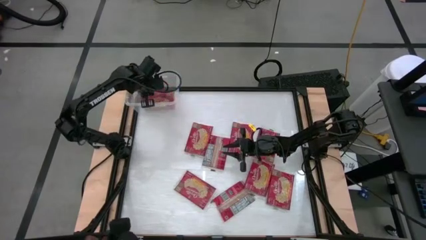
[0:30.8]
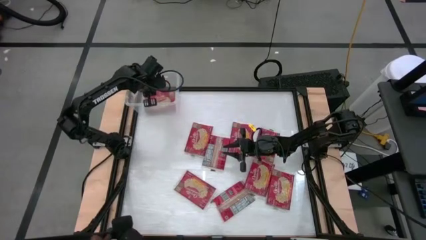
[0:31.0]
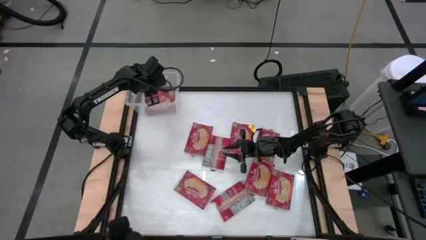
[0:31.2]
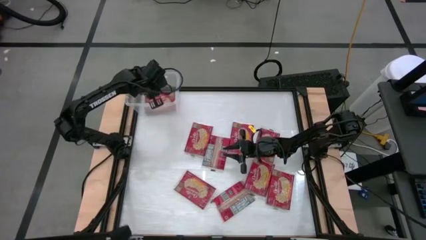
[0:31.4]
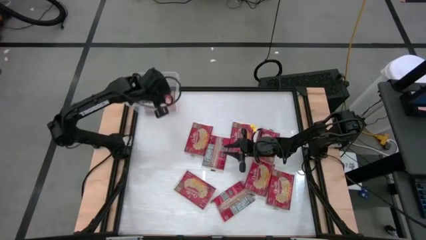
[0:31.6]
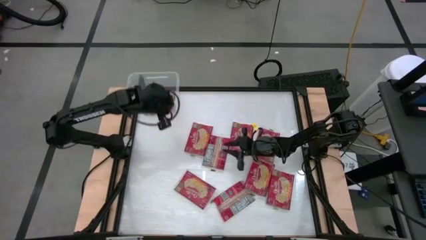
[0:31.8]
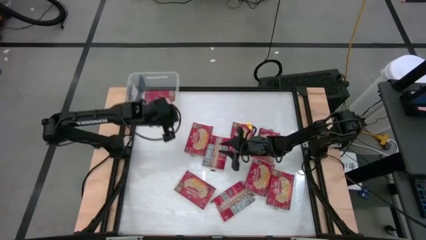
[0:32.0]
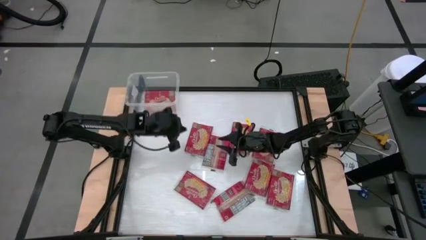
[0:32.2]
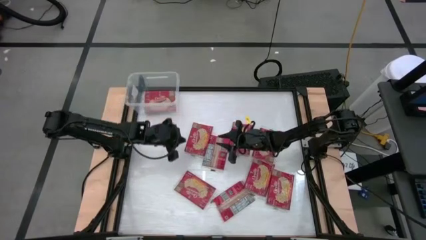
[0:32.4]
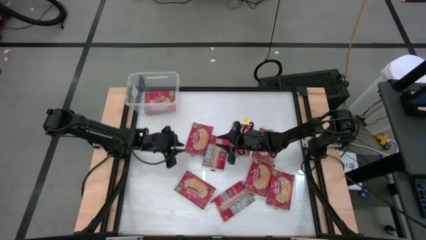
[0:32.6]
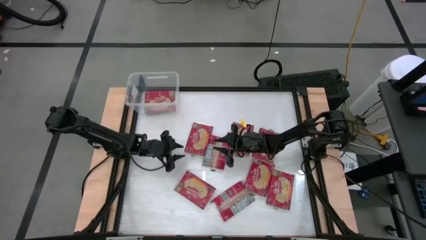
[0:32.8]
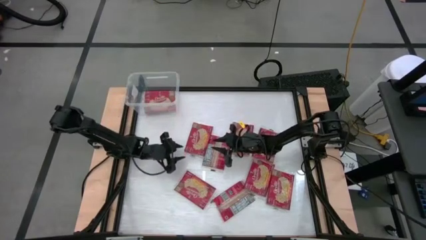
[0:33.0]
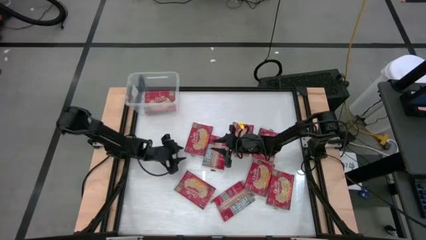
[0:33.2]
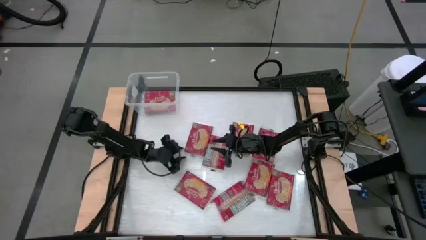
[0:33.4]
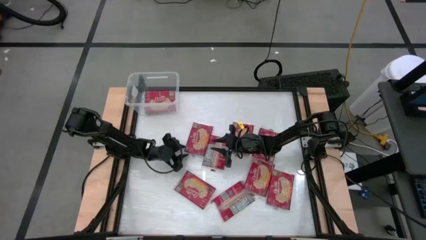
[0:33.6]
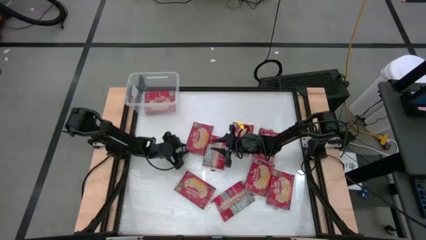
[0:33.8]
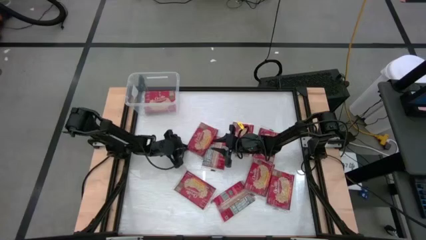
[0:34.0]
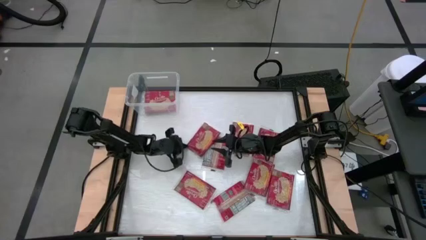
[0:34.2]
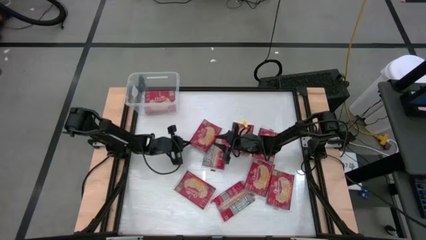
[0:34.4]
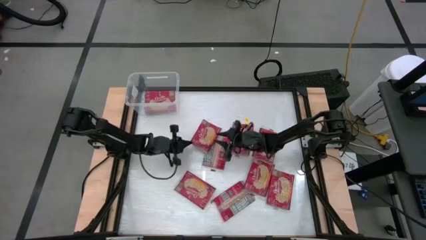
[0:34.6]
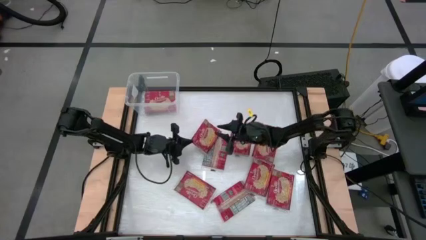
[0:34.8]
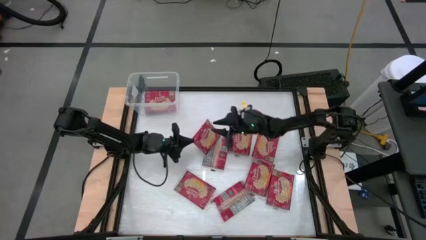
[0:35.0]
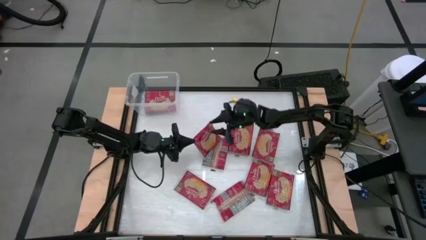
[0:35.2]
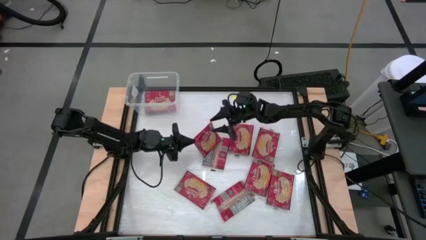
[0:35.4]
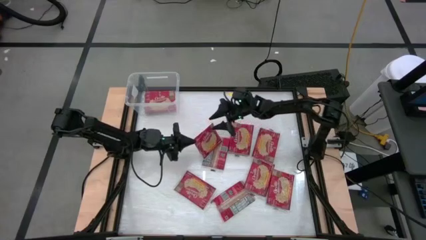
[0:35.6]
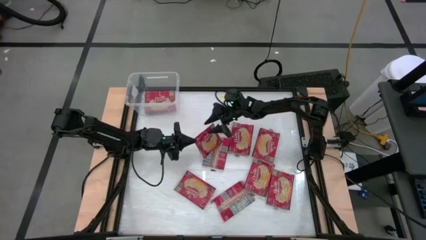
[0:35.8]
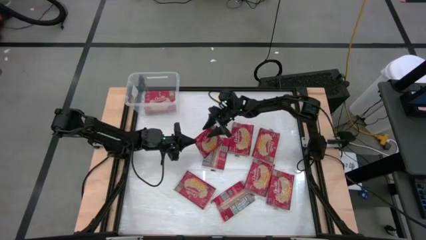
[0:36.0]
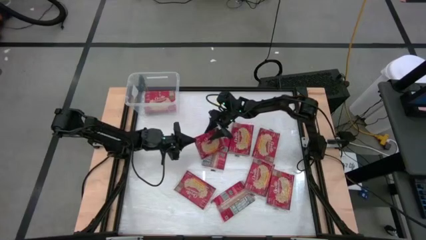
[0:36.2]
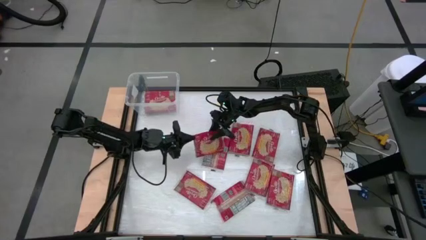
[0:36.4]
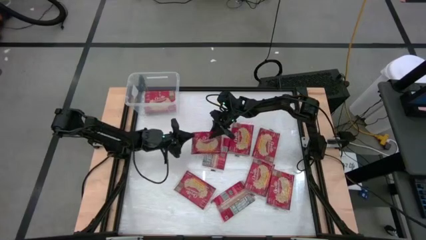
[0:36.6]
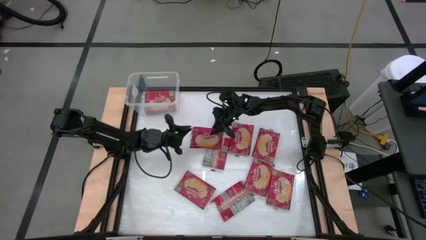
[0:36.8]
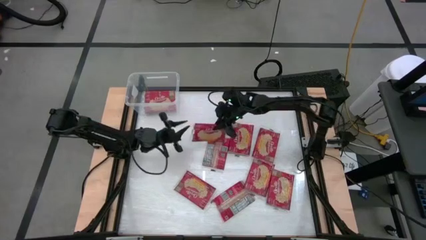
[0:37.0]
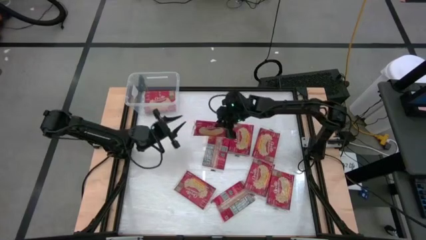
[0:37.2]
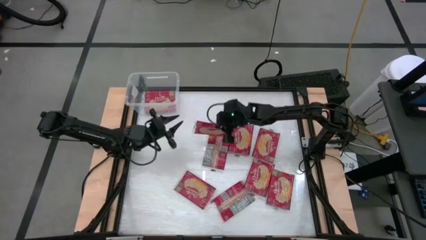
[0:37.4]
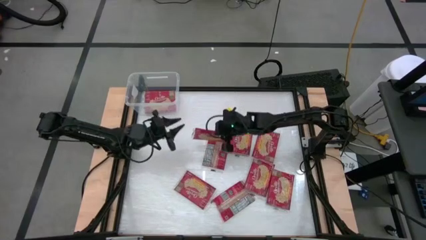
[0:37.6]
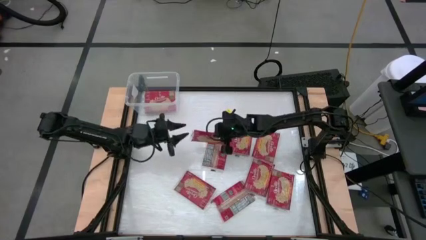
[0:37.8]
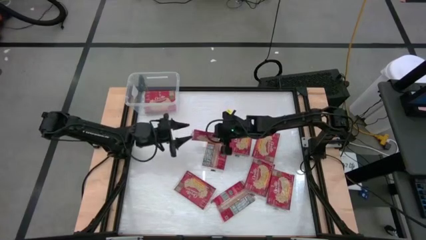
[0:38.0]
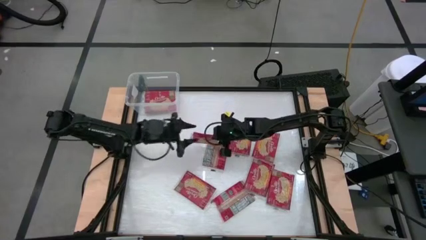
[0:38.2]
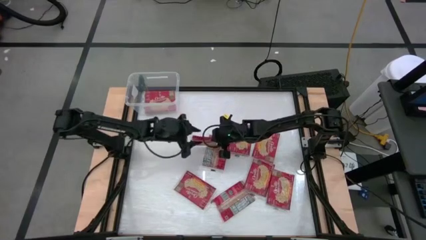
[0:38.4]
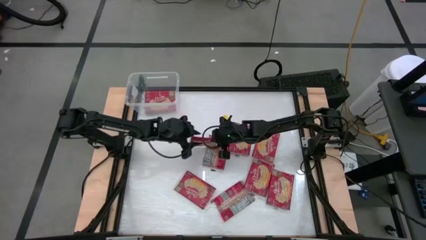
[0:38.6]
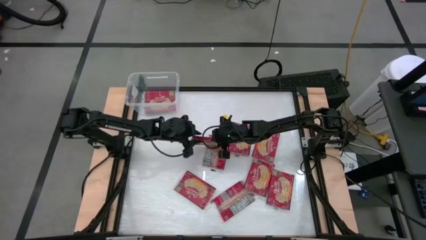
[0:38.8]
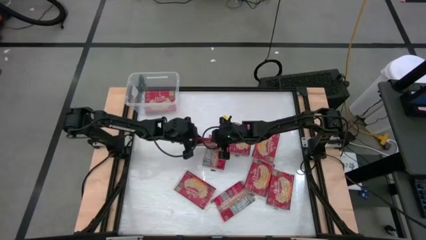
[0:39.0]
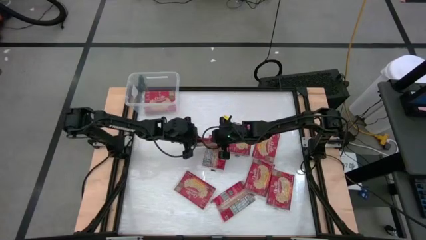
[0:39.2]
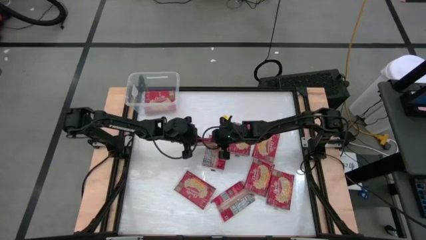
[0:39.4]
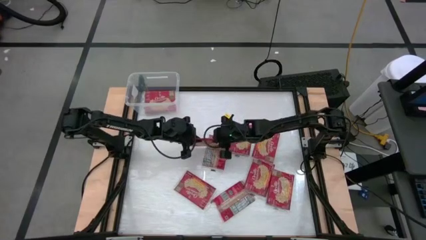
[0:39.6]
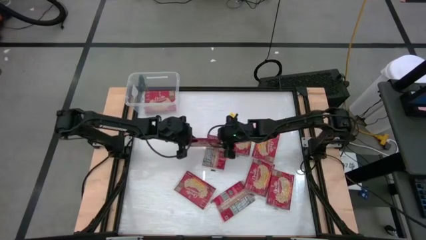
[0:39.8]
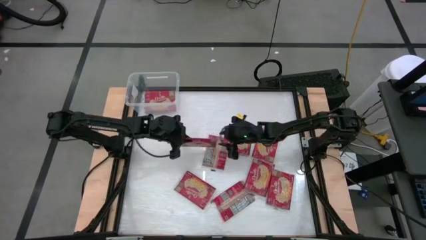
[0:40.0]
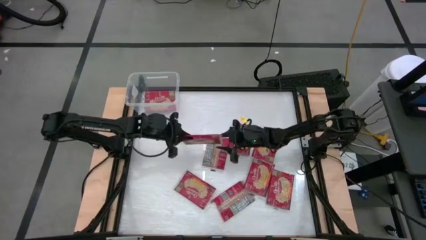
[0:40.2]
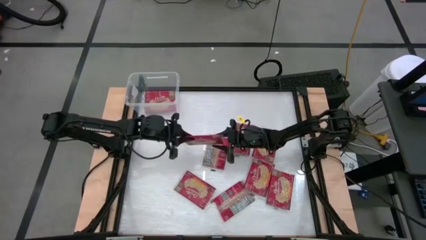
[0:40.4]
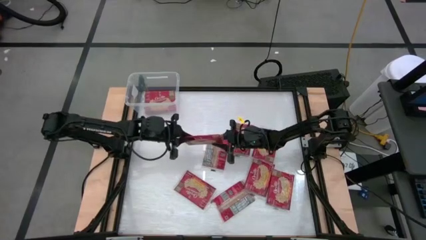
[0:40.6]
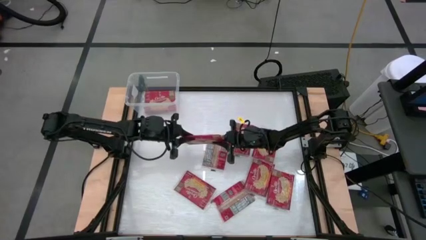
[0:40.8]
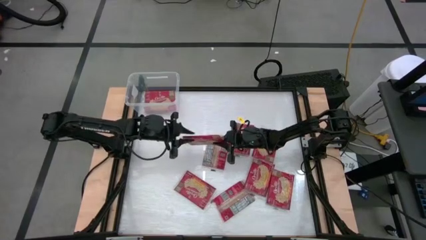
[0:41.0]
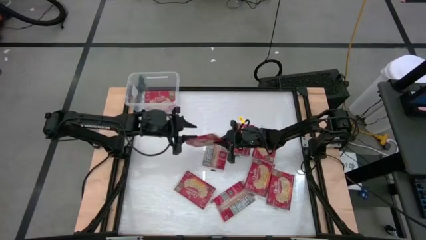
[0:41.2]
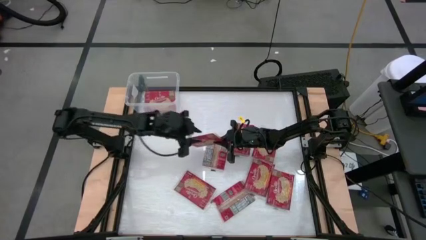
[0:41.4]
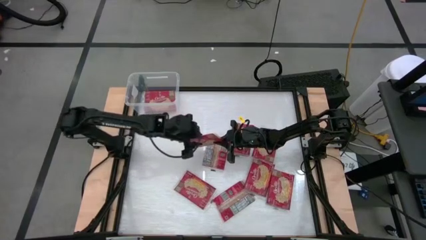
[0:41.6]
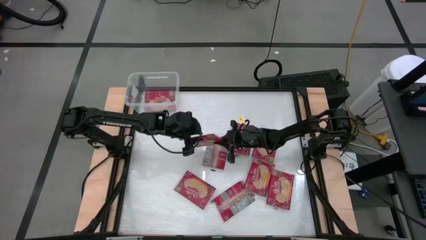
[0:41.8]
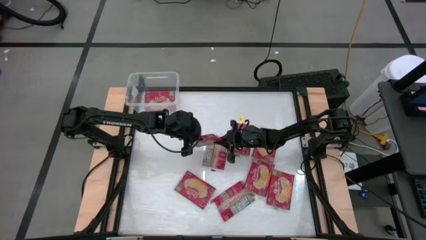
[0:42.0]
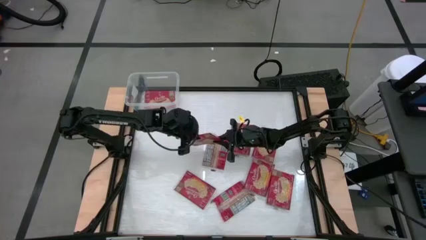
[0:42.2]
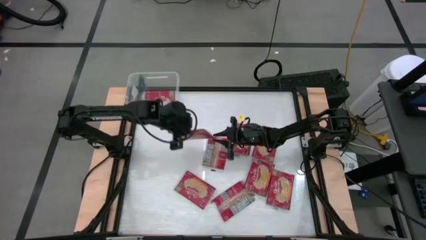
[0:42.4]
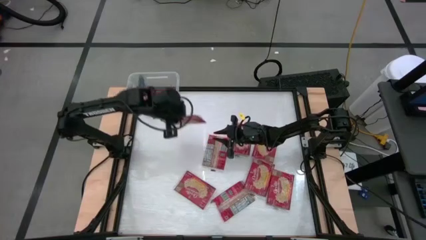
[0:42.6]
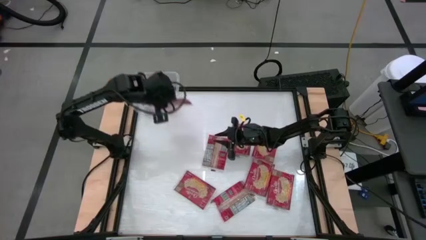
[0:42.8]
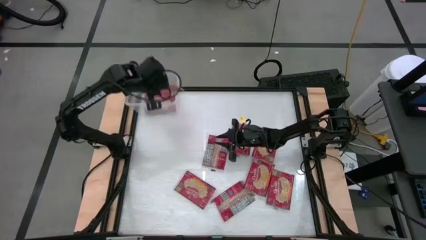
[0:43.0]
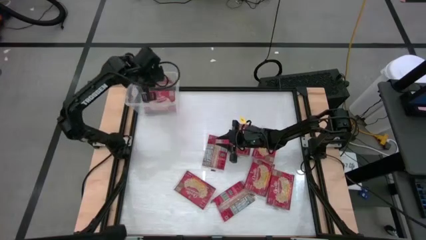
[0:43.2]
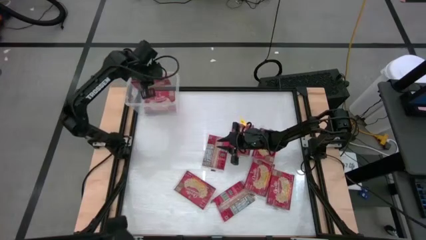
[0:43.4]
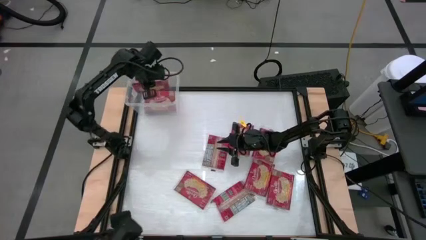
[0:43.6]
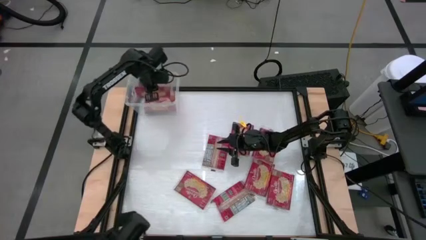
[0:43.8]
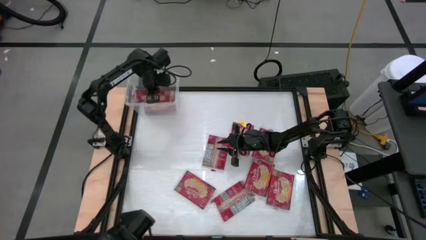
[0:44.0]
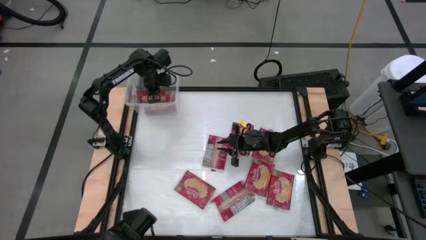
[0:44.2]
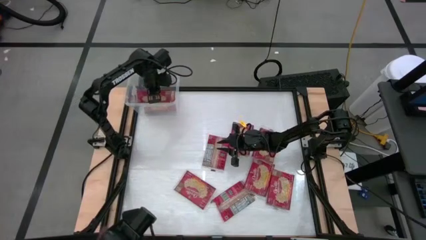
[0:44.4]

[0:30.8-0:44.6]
Task: Sort popcorn bags into baskets
Put the red popcorn bag into the transparent container

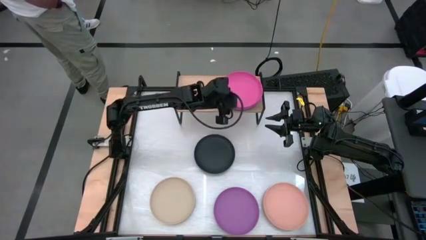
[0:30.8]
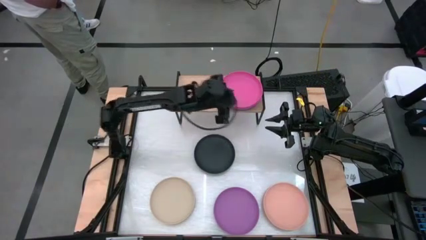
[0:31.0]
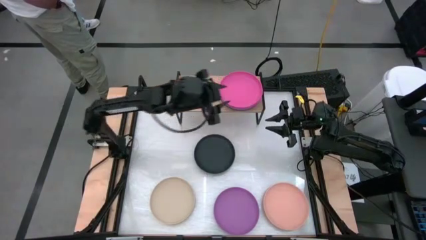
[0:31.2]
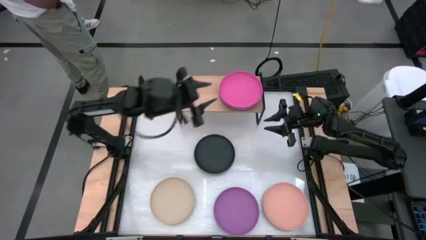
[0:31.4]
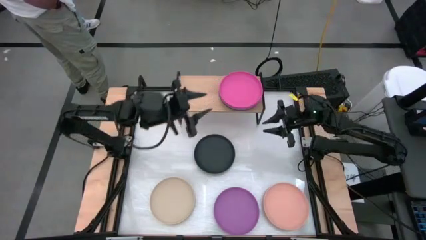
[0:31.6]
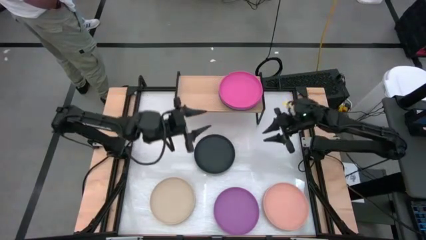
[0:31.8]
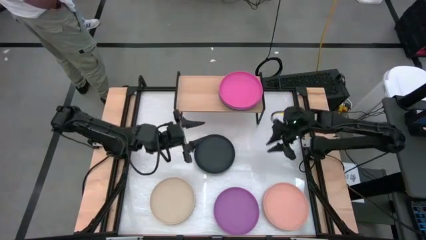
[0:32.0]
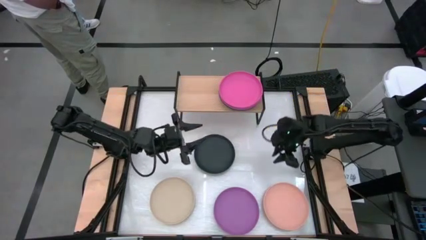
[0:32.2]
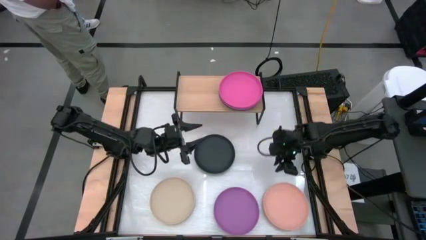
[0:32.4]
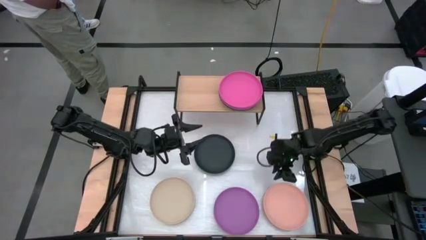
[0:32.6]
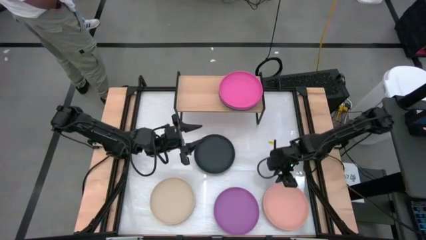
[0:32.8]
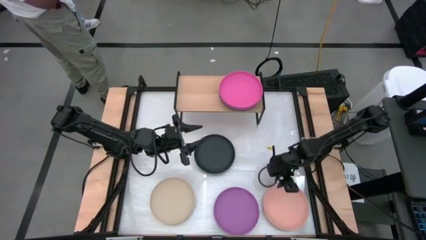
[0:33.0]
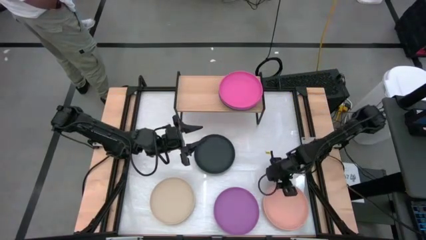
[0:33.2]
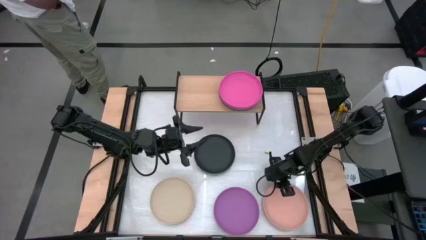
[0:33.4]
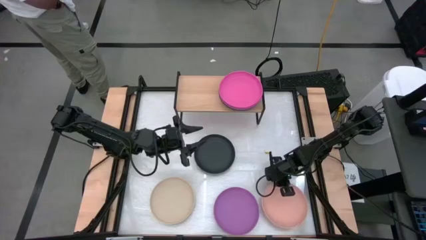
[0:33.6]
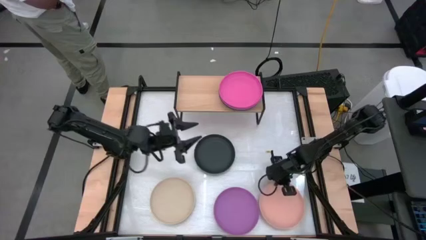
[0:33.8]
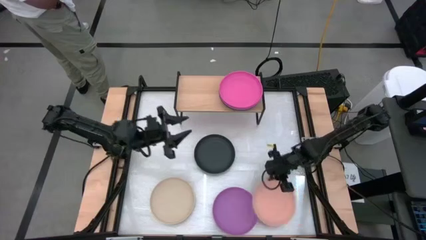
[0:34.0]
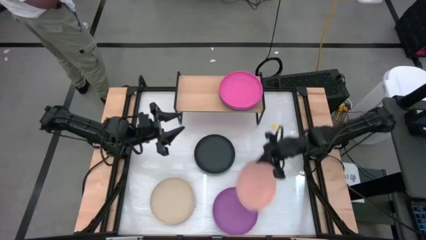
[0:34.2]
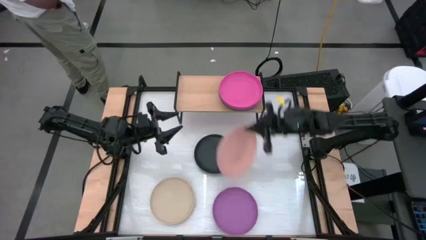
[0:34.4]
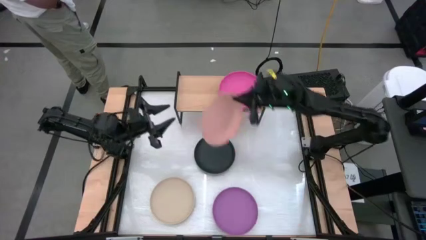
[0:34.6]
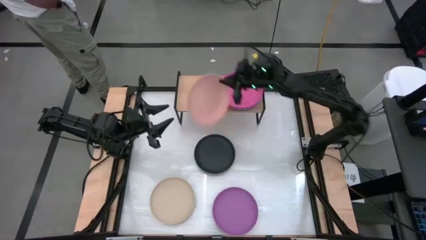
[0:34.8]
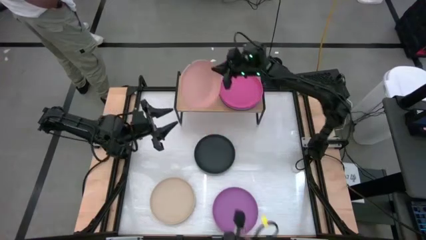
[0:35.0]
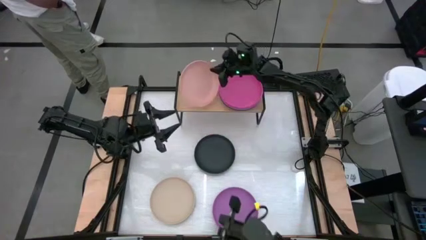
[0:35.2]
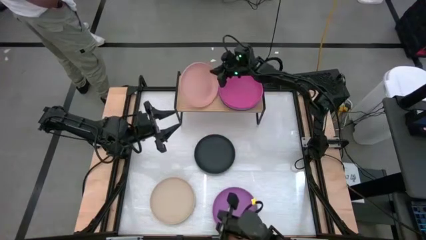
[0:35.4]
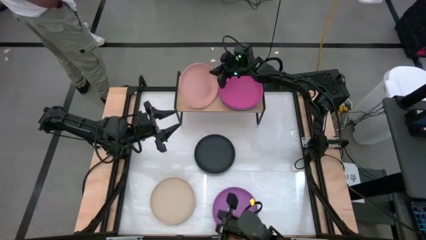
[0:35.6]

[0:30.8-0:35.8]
Task: Place and stack plates onto a shelf
Put the light orange plate on the shelf
